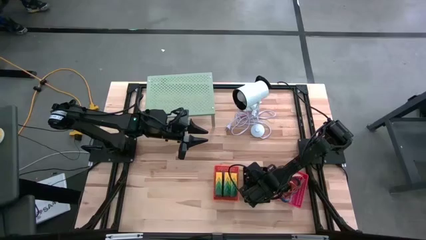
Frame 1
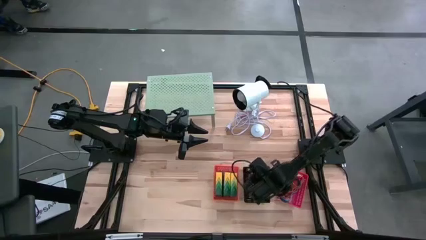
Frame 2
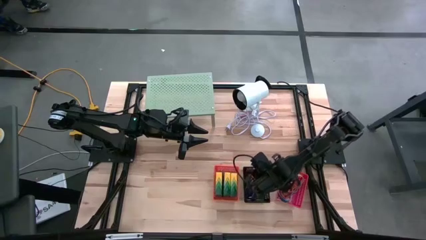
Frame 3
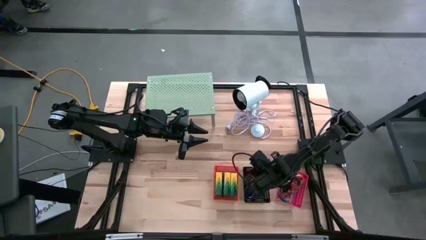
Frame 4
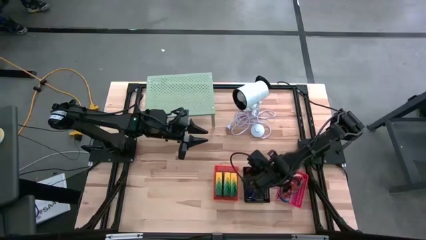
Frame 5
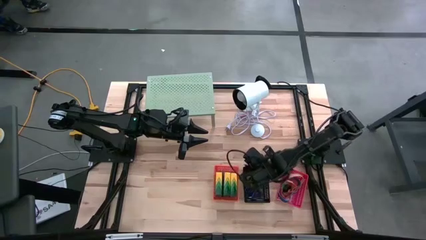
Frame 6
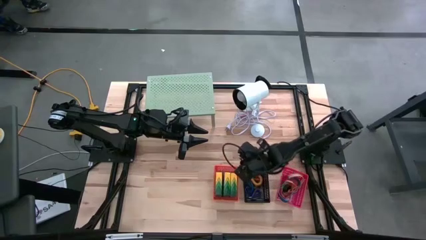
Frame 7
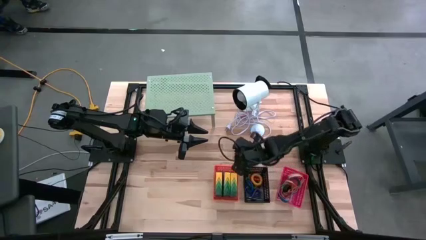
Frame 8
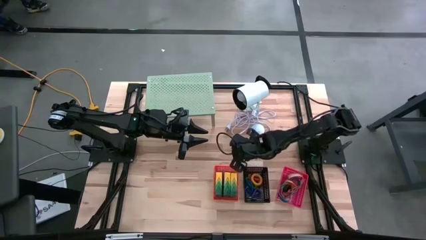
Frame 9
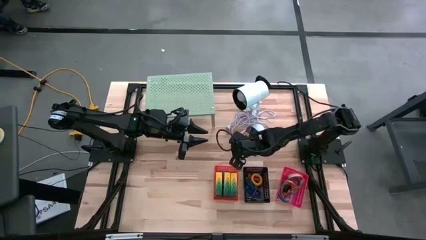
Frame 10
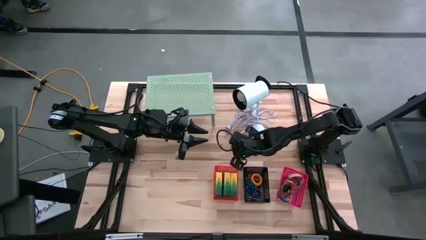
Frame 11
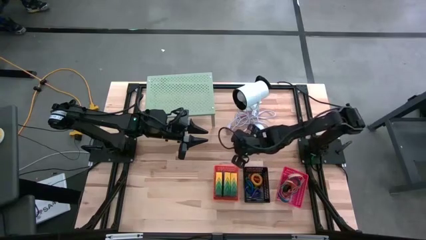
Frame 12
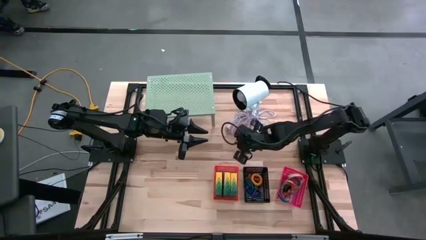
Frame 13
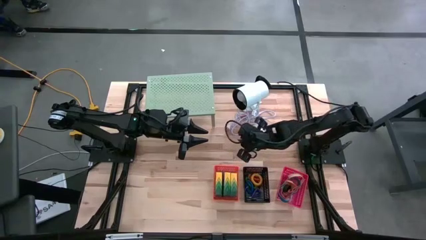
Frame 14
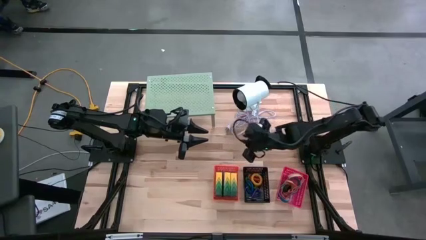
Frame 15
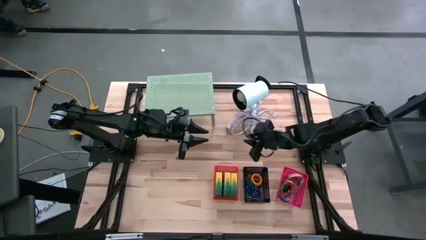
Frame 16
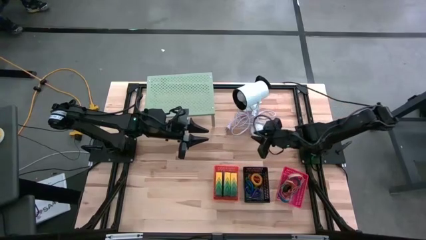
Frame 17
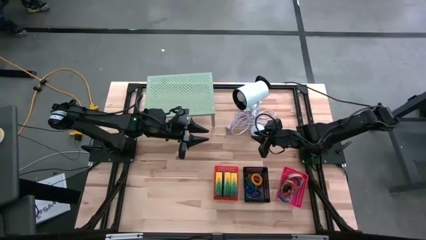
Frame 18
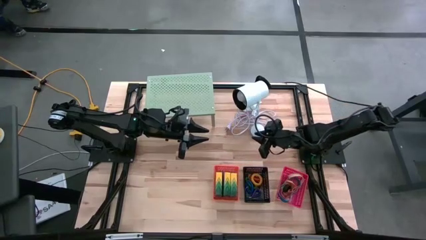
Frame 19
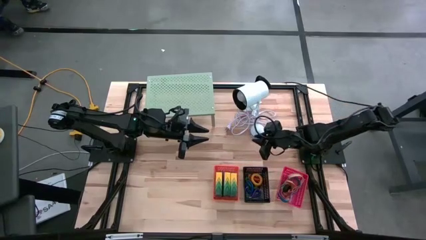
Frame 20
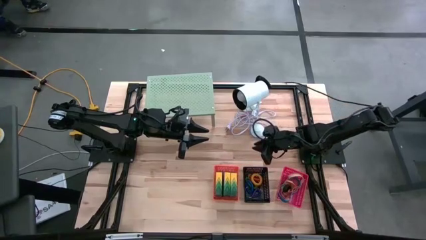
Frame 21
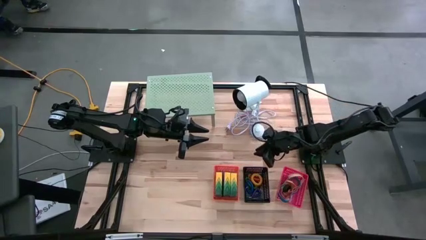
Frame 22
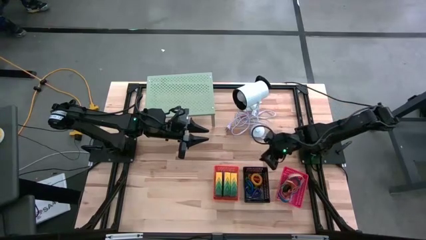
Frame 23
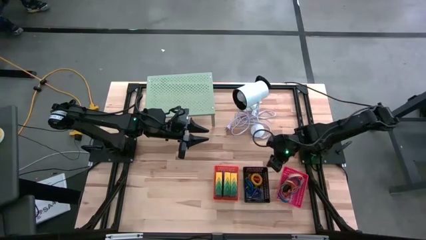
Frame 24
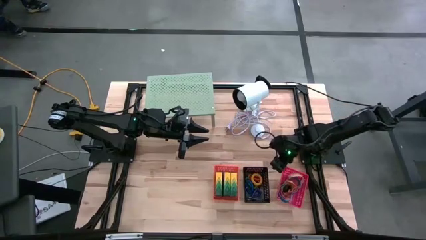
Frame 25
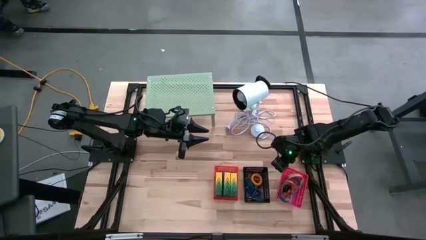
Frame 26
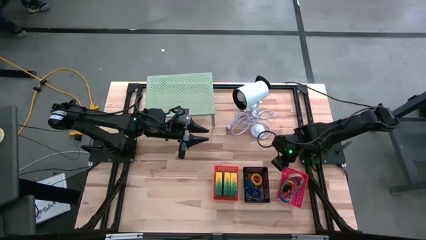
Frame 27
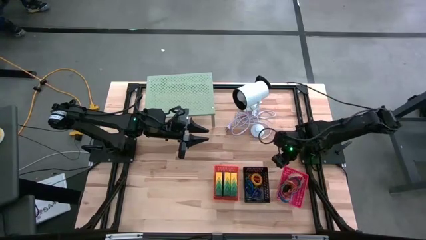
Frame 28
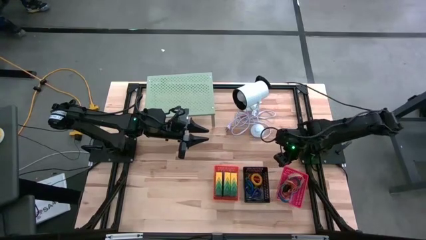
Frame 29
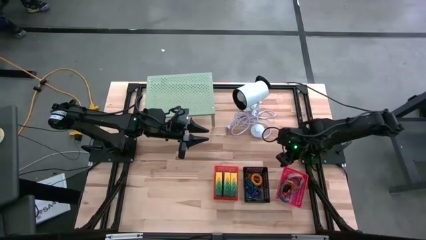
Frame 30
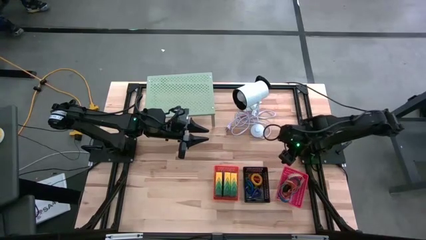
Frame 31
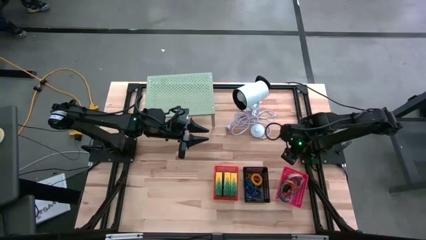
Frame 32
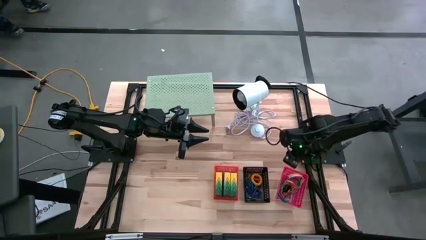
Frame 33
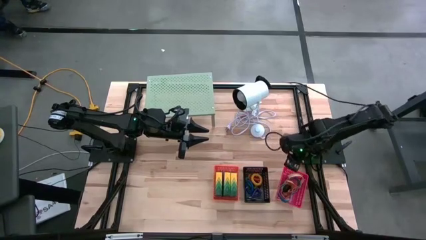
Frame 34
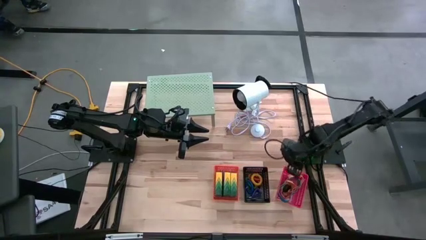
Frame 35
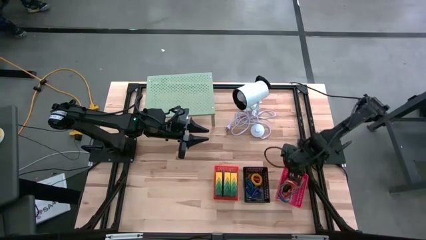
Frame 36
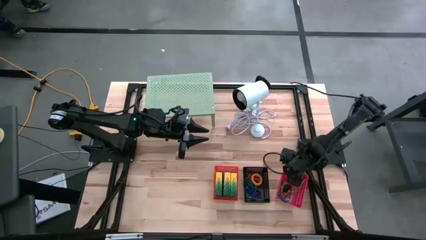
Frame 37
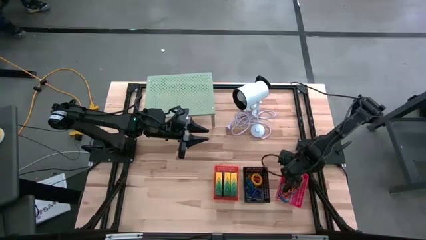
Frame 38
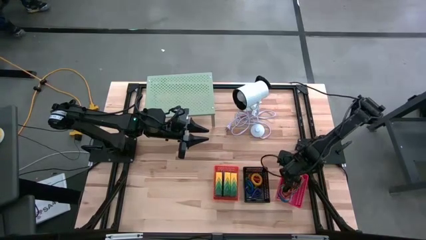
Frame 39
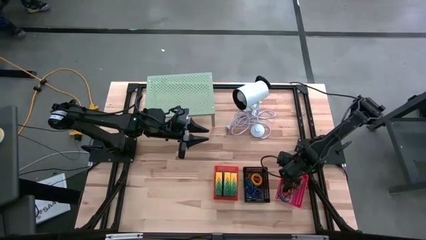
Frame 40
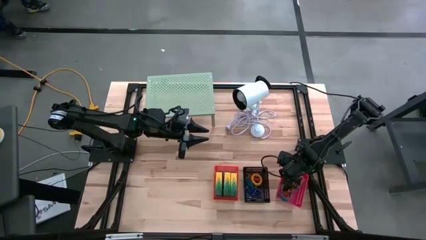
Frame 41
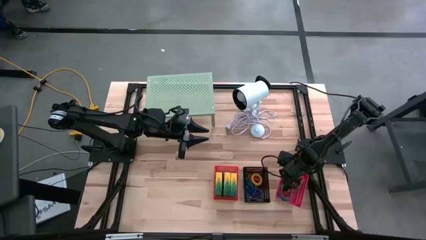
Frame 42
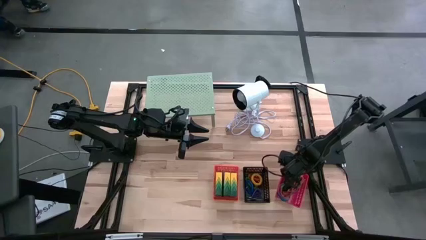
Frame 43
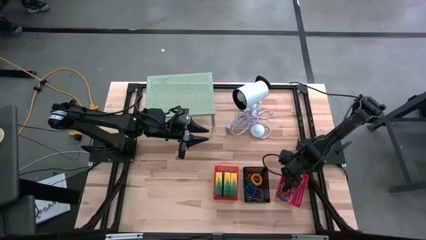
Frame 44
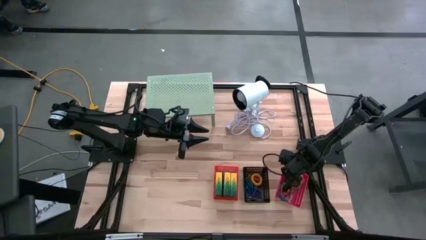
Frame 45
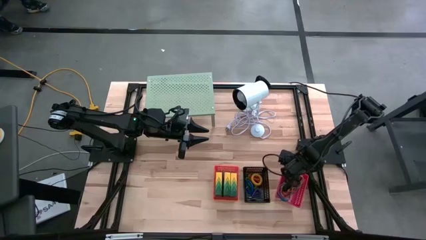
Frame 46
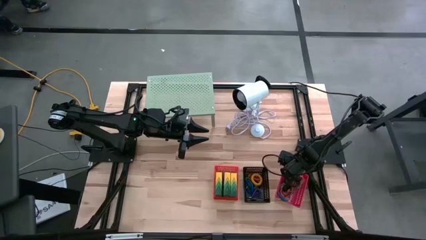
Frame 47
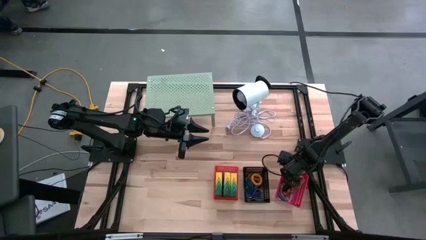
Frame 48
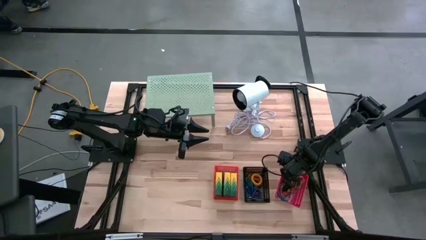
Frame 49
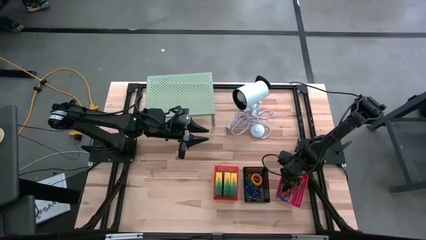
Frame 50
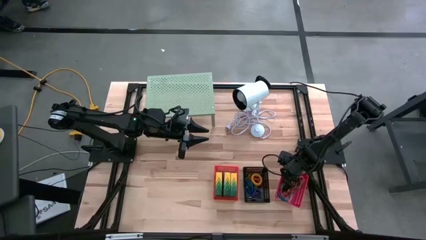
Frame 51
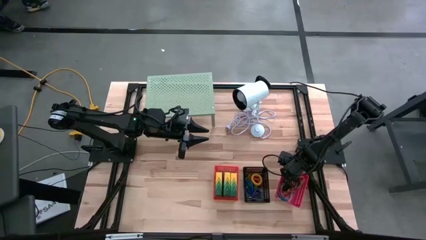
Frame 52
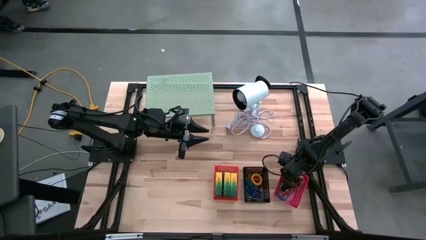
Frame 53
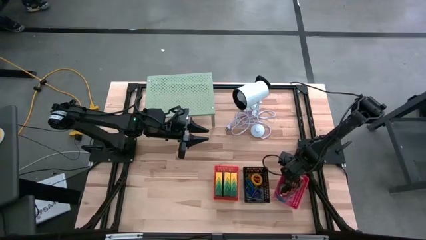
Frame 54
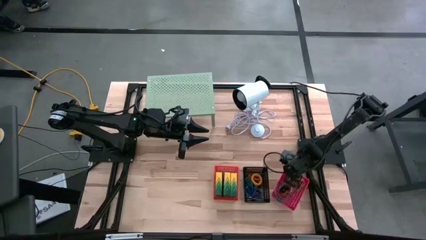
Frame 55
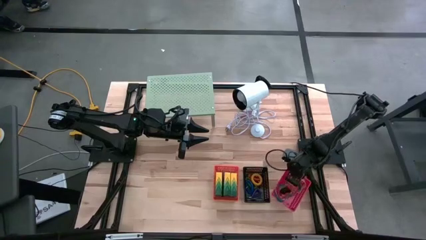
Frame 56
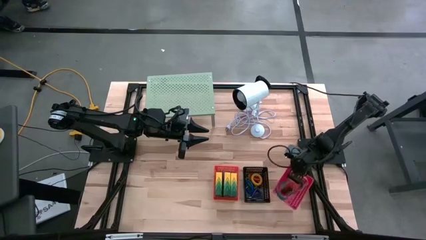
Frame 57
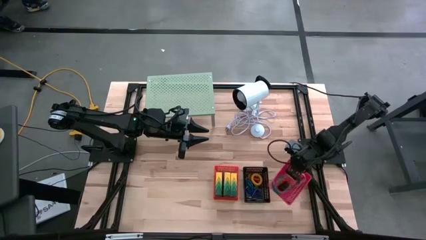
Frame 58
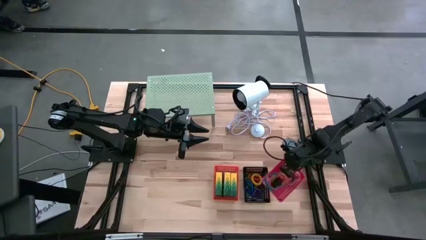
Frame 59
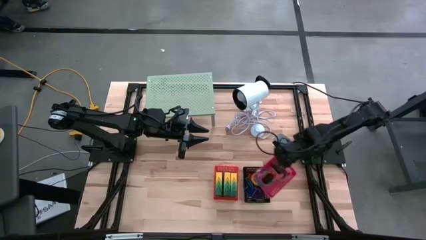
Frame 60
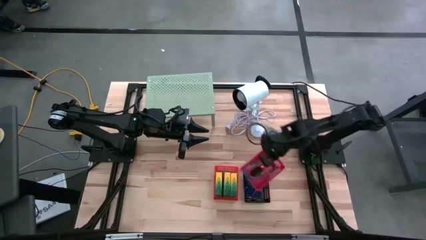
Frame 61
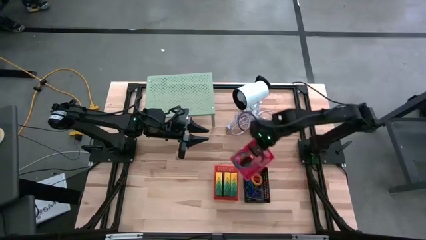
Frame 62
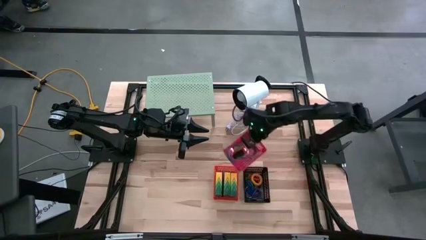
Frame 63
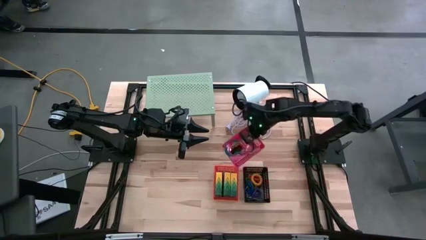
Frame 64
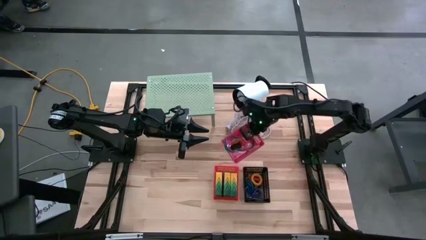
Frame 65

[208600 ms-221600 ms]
Task: Pick & Place Office Desk Supplies
Put the red basket on the shelf

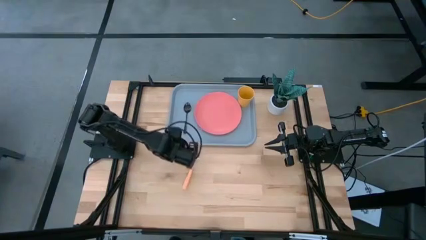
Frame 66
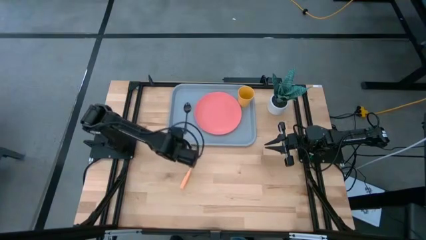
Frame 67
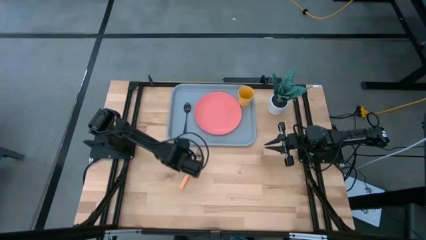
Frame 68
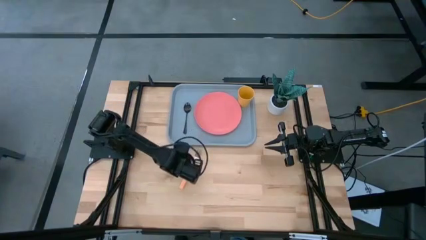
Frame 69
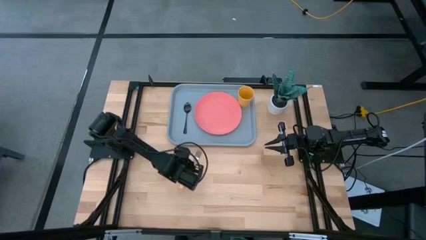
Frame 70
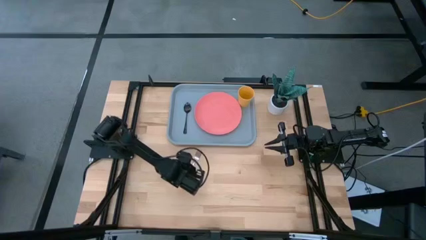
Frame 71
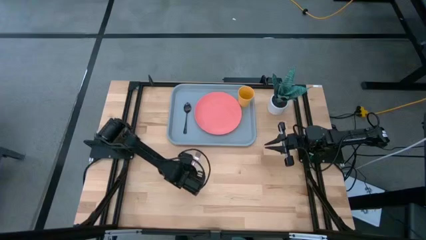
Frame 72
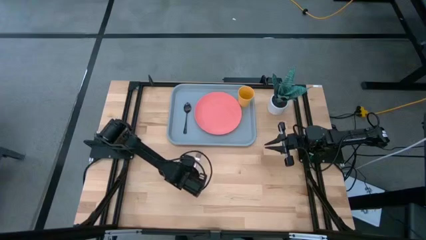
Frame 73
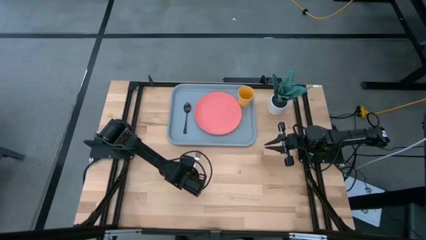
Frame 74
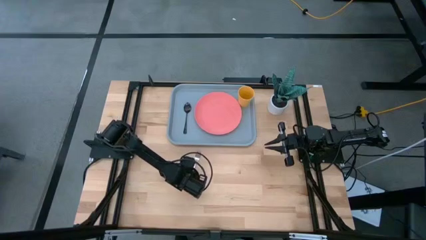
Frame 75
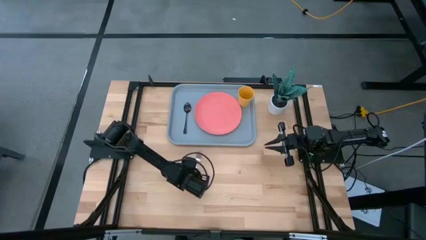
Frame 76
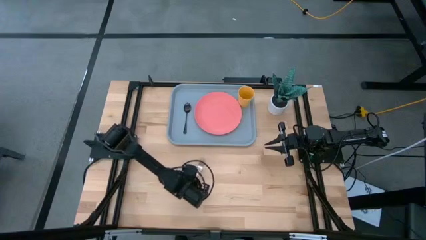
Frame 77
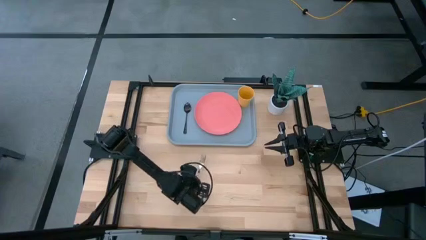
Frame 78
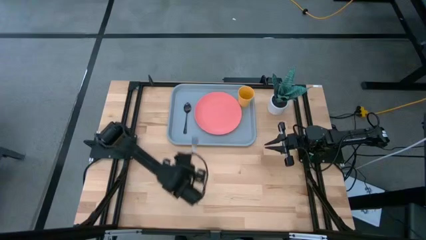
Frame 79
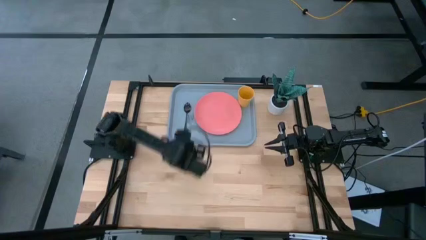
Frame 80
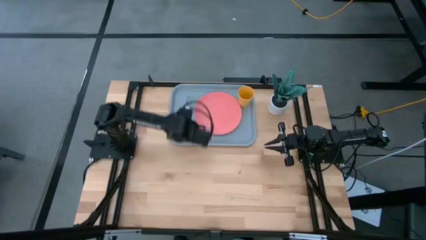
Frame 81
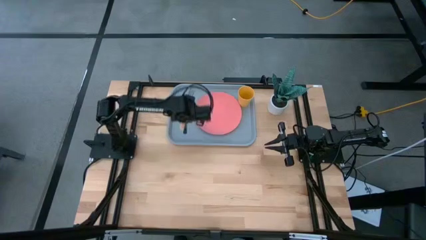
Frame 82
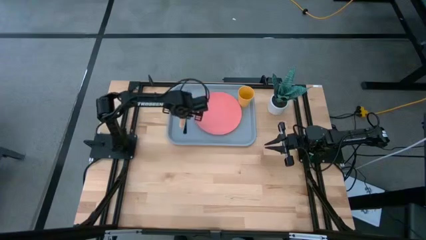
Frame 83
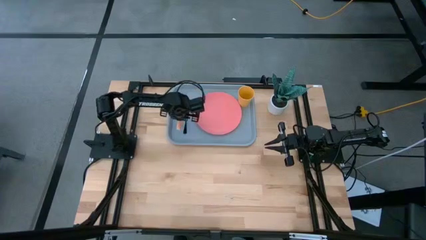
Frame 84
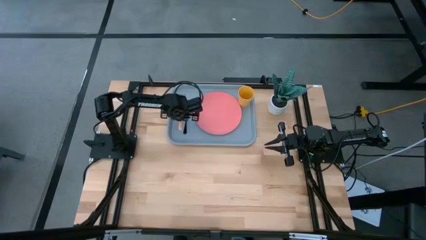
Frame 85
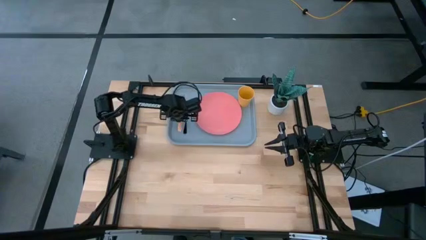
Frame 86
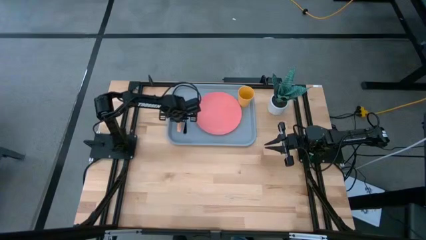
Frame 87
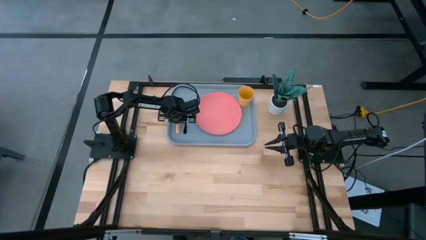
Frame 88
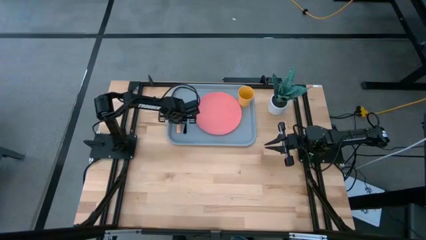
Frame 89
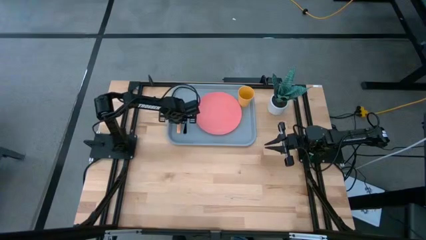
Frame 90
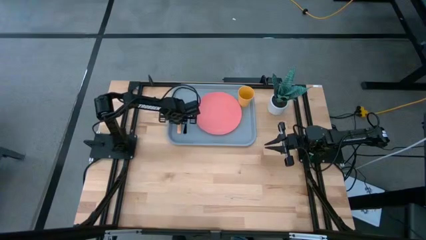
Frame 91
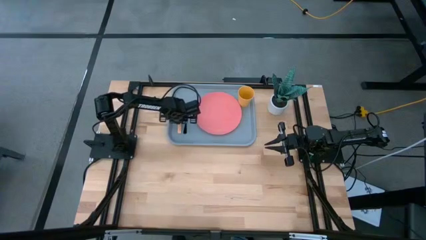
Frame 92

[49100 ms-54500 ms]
Task: Pick and place plate/cup/fork/spoon on tray
Put the orange fork on the blue tray to the left of the black spoon
